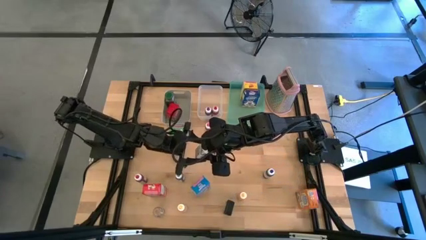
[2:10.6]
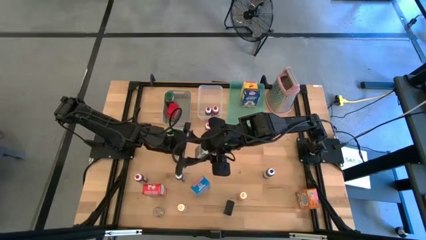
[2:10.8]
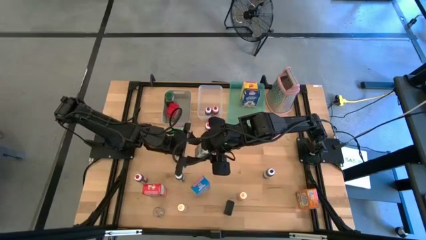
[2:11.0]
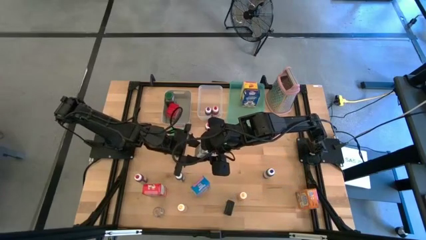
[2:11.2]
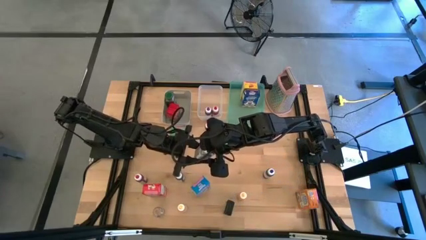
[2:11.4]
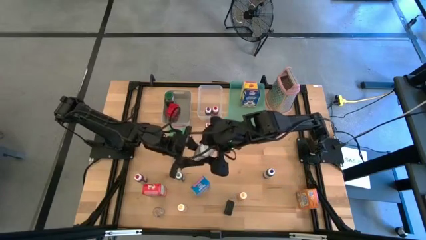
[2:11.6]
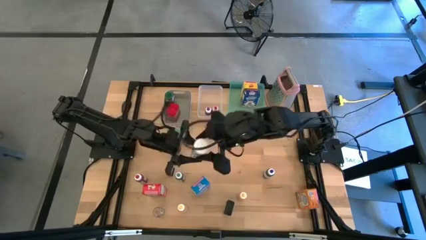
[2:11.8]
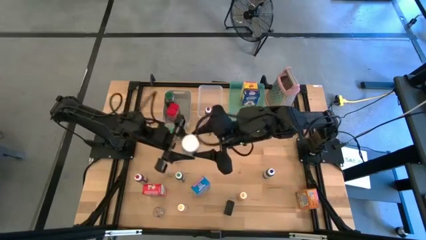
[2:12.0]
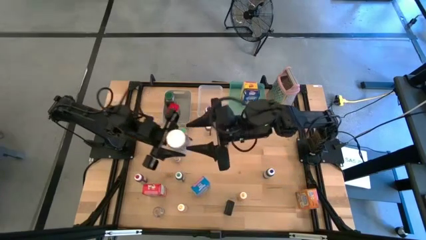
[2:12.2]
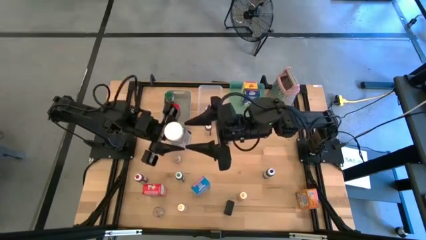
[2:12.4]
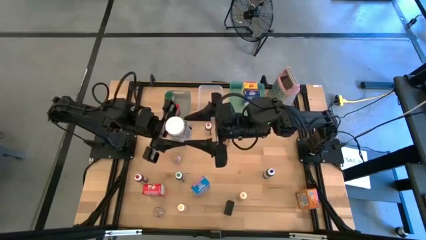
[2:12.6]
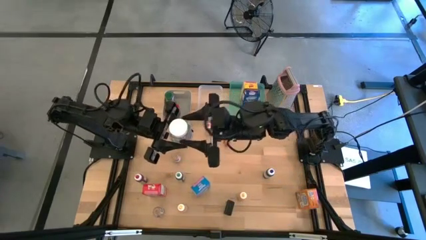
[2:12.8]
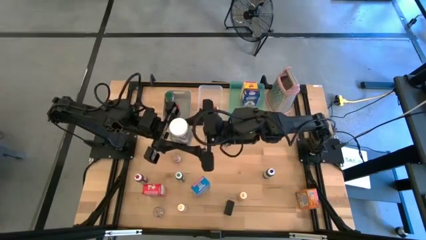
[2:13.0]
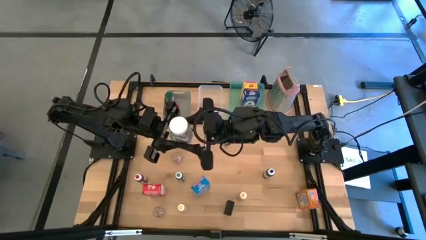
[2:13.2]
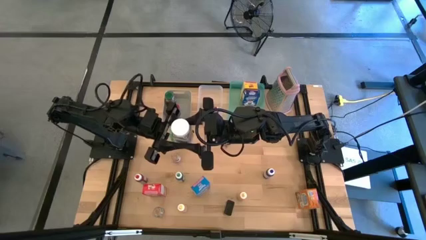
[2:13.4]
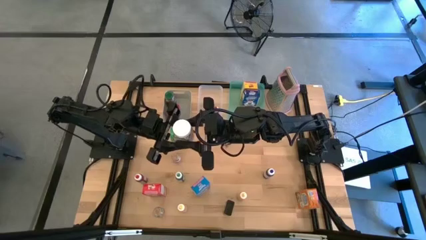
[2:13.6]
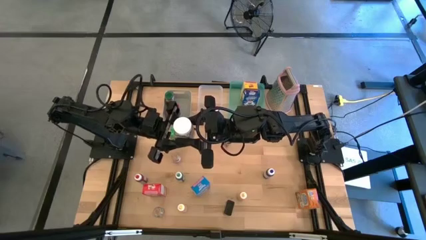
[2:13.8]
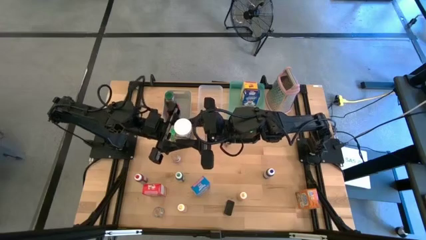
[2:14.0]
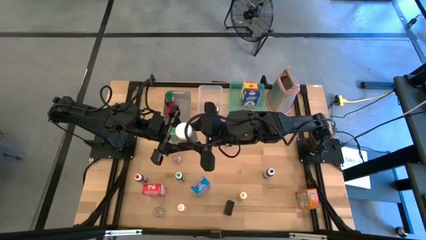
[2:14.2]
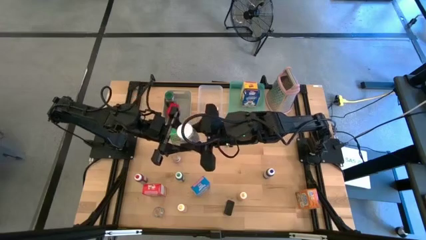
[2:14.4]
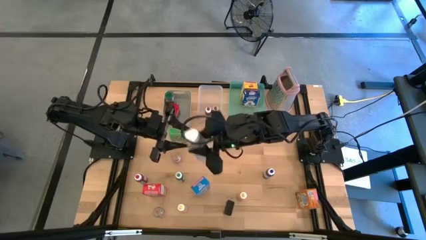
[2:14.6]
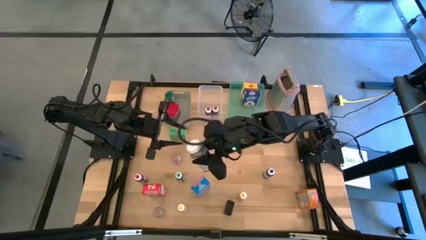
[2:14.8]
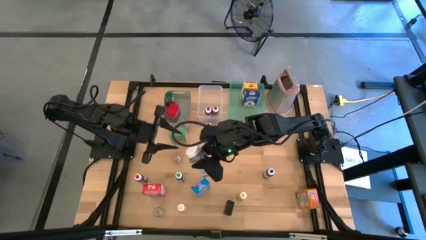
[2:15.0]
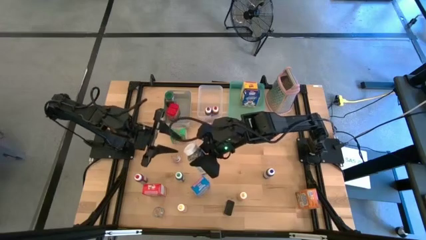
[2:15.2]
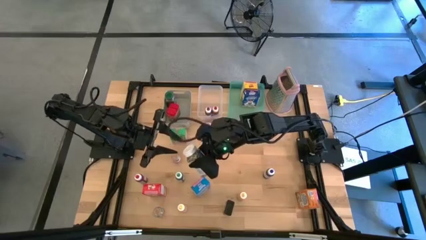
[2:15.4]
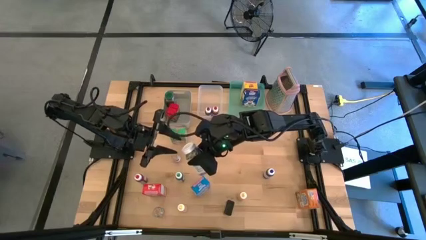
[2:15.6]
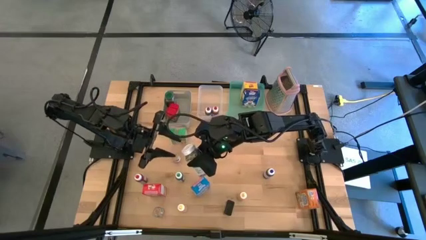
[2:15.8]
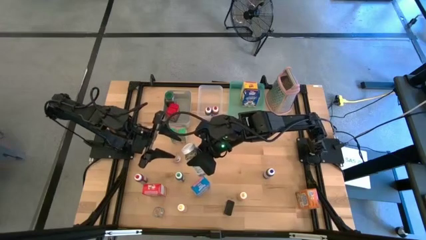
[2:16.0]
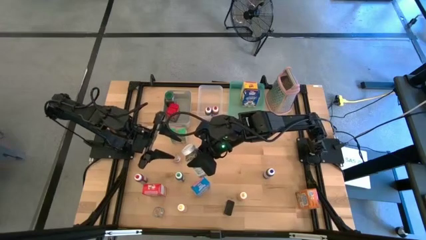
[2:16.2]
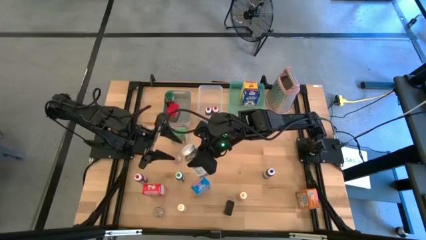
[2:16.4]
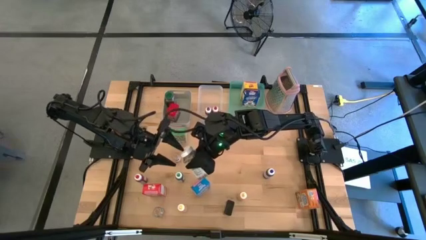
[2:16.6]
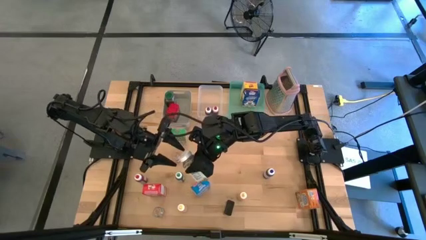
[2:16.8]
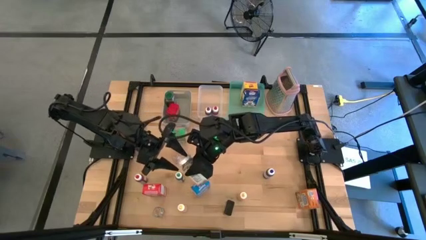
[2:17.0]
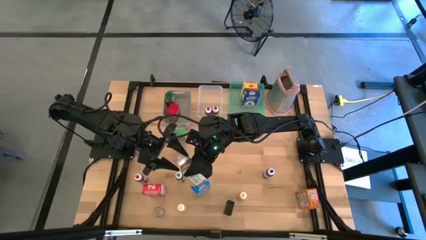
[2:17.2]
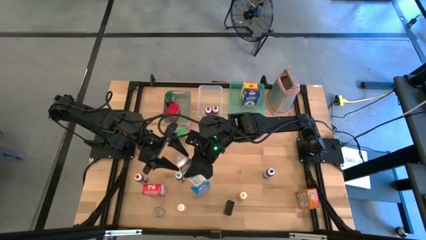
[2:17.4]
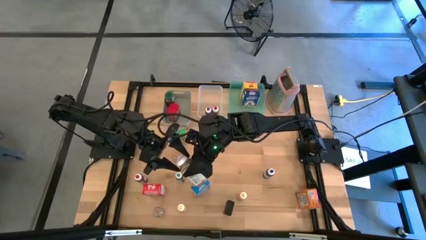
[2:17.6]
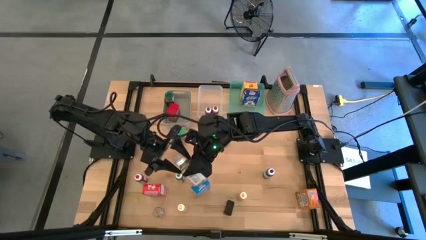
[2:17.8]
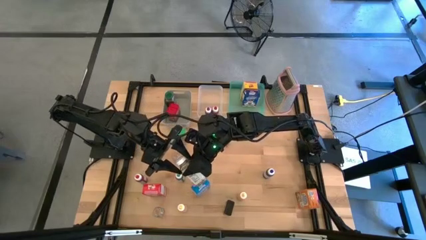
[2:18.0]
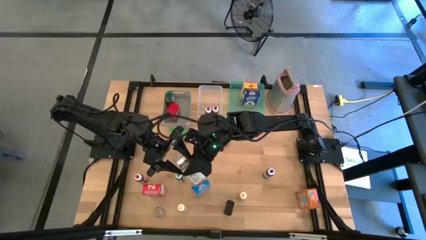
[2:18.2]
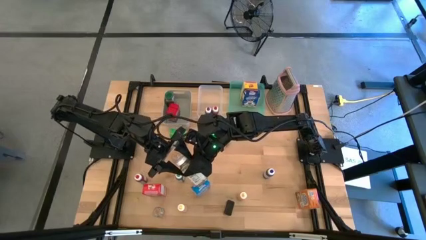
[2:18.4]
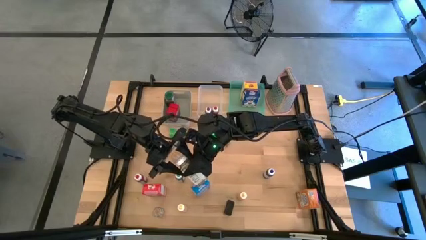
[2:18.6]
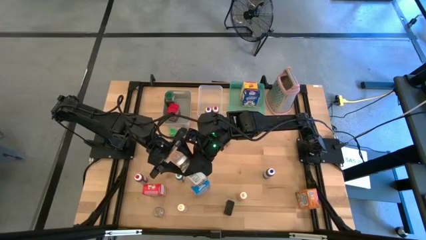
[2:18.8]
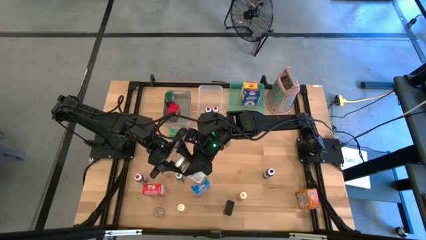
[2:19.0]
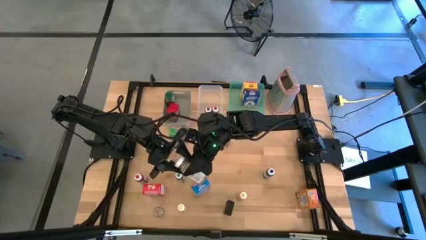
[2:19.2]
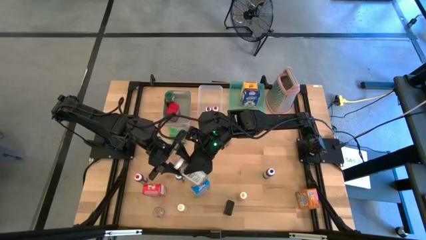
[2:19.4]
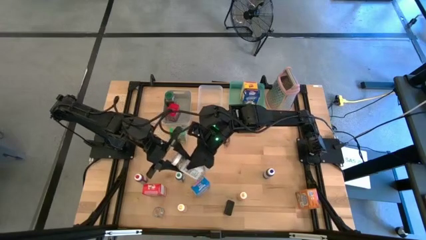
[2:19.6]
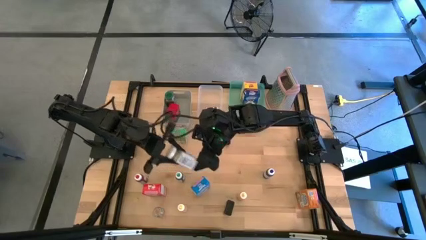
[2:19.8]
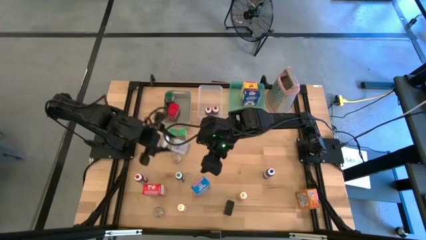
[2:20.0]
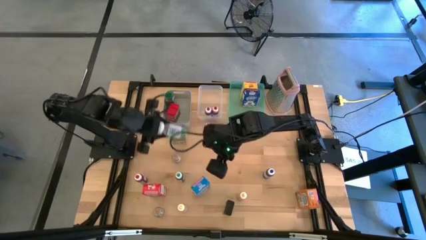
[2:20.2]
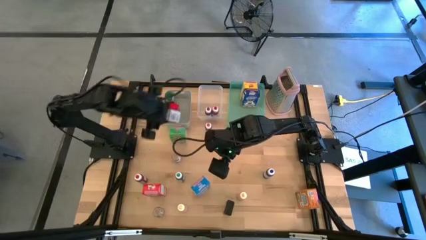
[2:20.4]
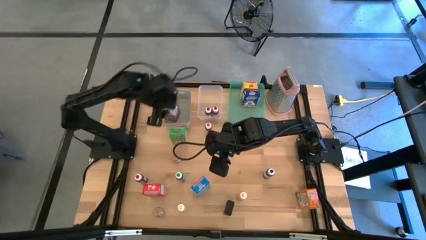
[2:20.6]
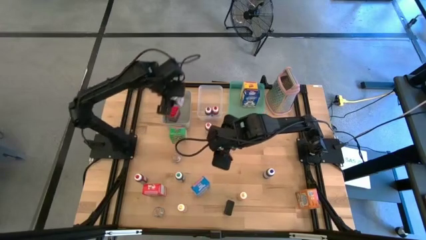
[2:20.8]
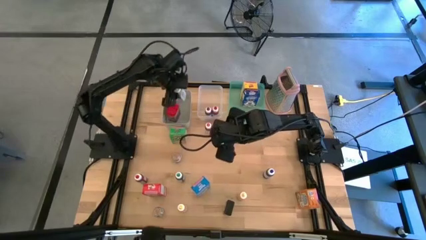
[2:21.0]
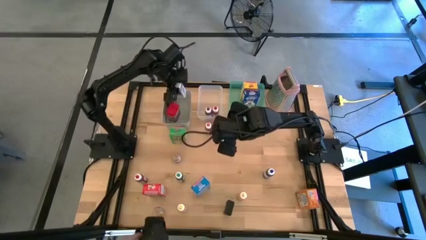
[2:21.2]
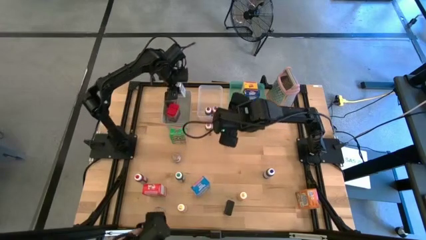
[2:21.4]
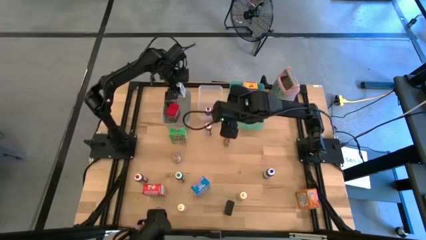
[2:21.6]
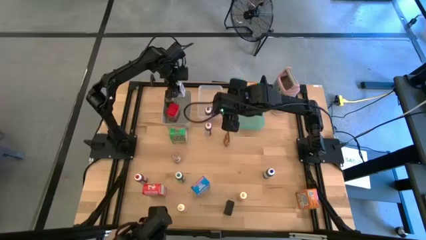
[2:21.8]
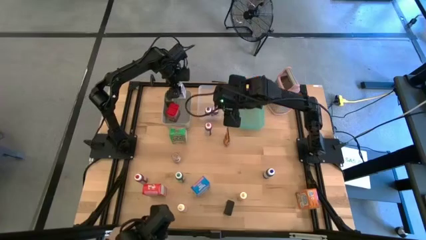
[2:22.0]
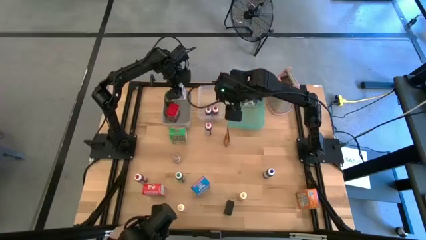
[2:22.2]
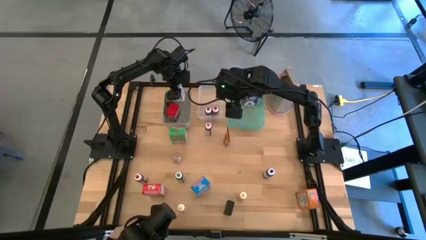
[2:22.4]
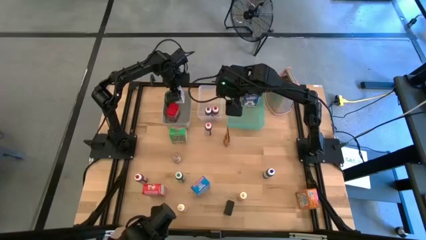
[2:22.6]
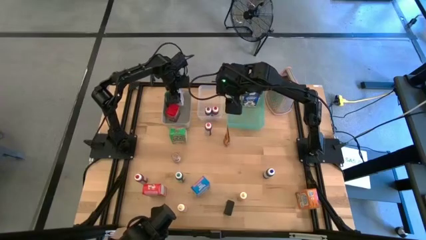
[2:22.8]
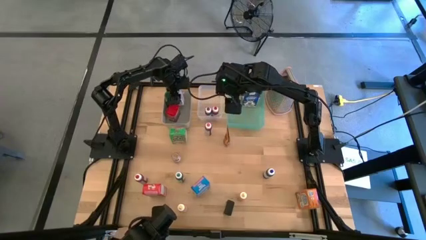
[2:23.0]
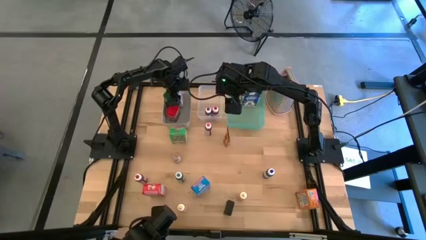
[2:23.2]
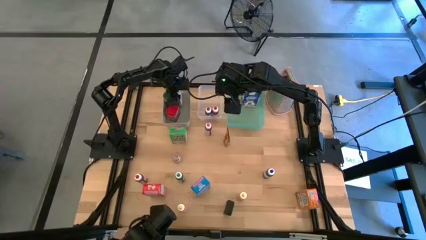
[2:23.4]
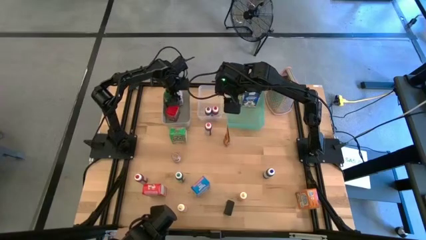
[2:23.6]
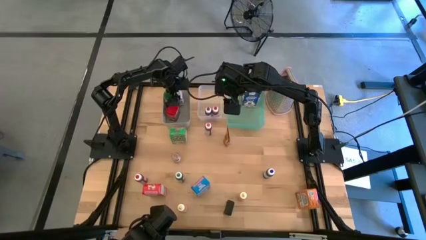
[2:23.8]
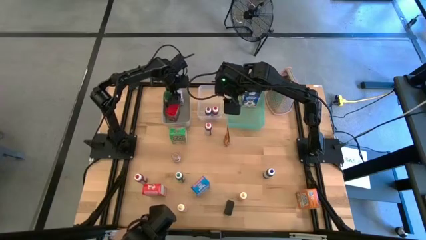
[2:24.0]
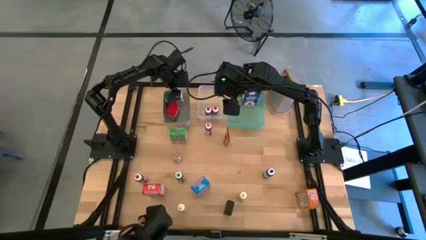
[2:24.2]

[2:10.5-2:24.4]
Task: Pick & Place Kitchen Items
Put the white seasoning bottle into the gray bin
